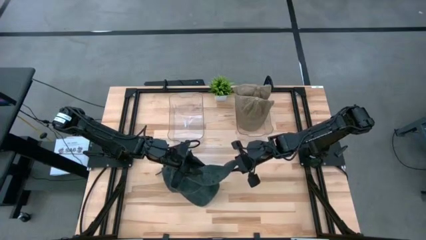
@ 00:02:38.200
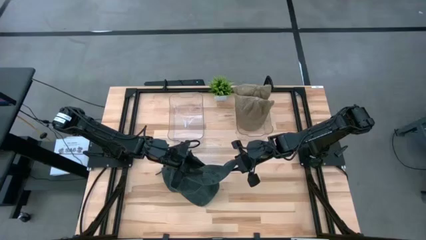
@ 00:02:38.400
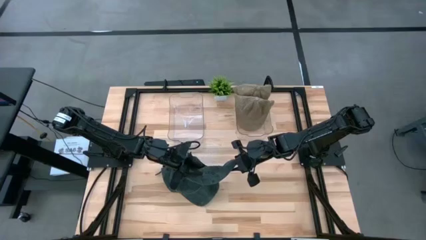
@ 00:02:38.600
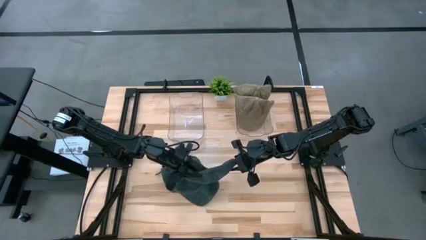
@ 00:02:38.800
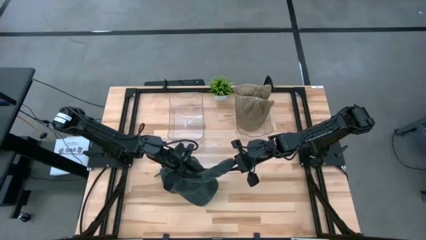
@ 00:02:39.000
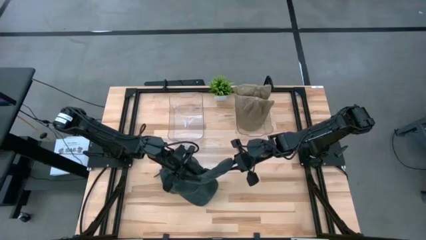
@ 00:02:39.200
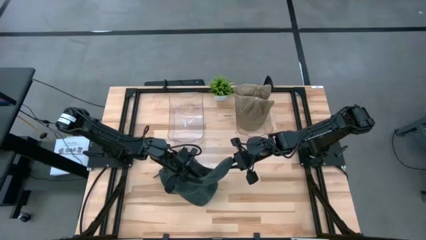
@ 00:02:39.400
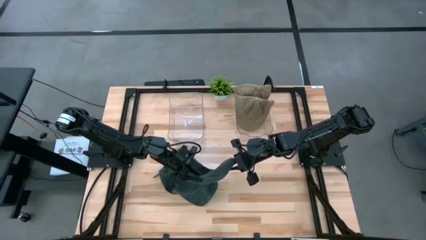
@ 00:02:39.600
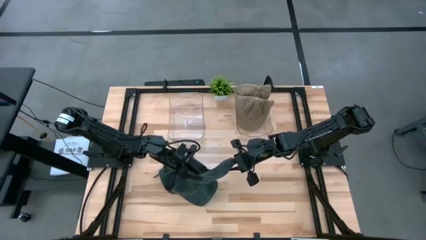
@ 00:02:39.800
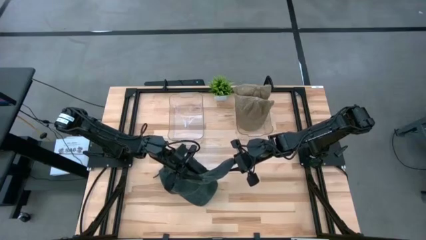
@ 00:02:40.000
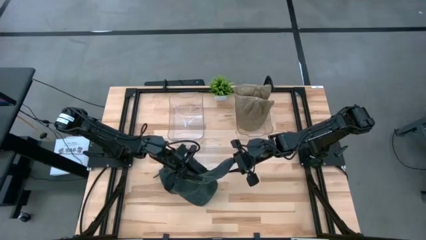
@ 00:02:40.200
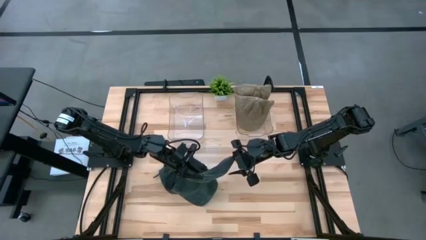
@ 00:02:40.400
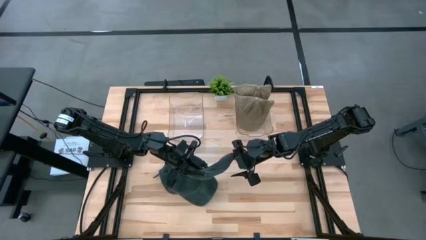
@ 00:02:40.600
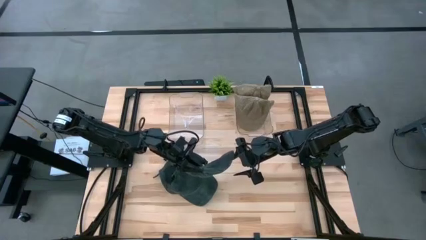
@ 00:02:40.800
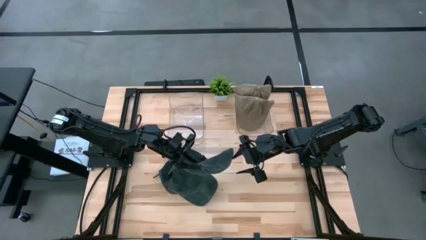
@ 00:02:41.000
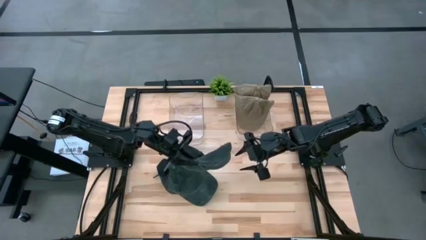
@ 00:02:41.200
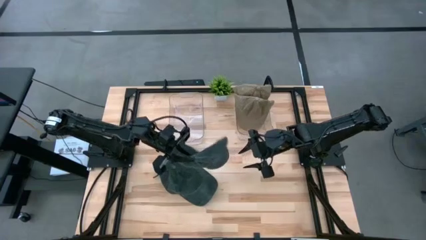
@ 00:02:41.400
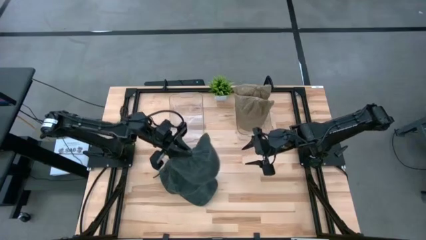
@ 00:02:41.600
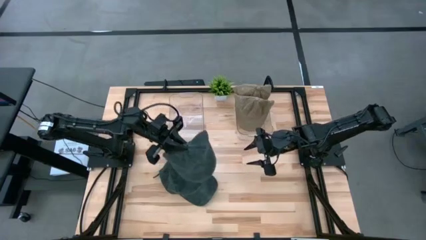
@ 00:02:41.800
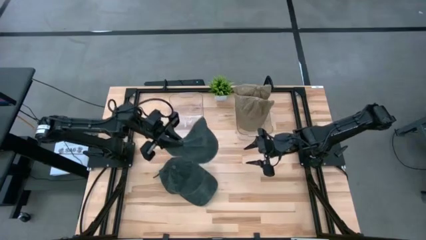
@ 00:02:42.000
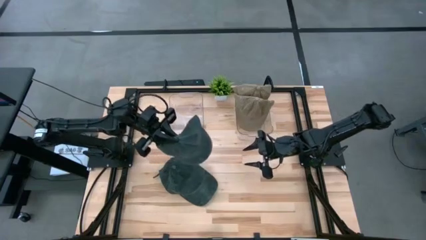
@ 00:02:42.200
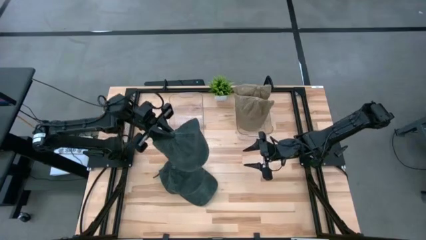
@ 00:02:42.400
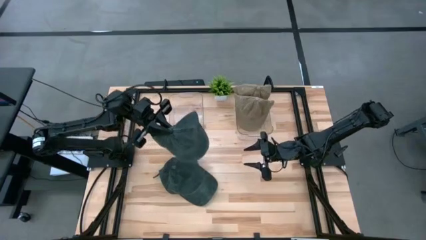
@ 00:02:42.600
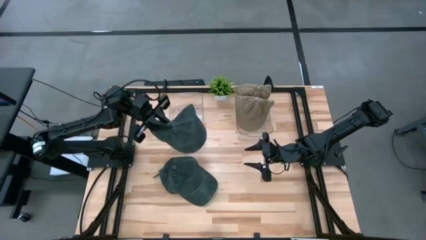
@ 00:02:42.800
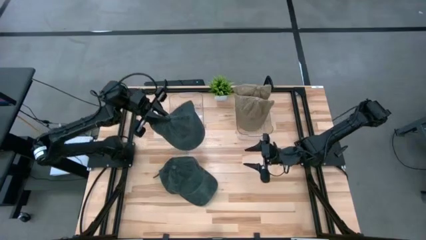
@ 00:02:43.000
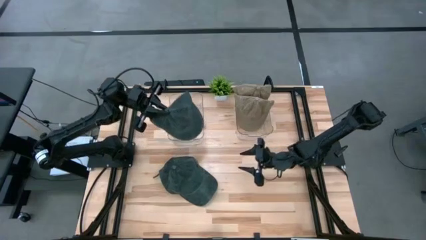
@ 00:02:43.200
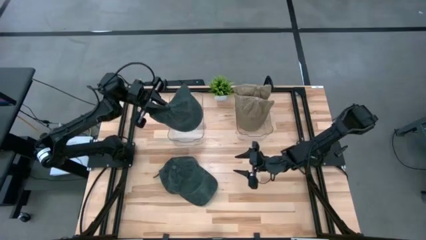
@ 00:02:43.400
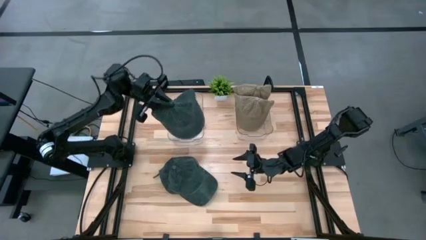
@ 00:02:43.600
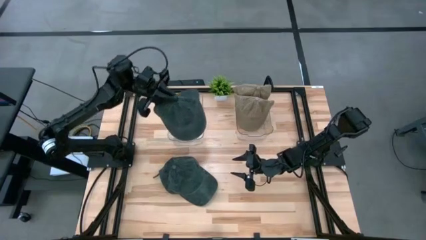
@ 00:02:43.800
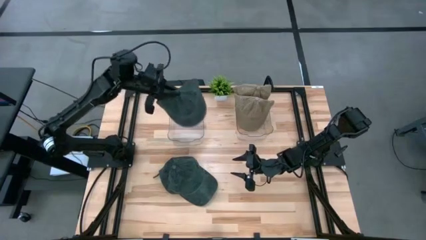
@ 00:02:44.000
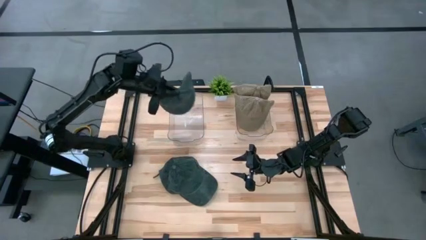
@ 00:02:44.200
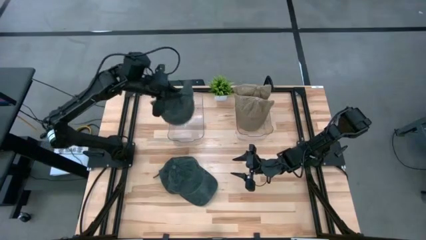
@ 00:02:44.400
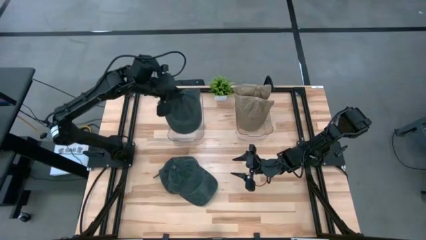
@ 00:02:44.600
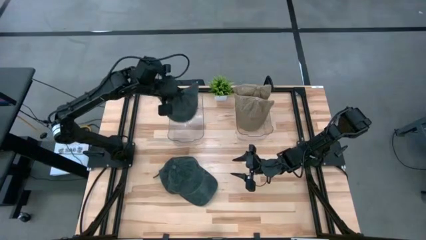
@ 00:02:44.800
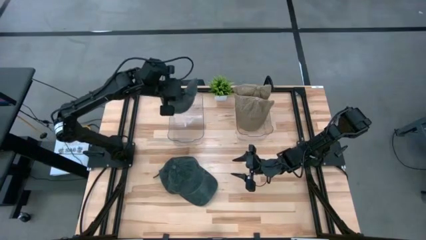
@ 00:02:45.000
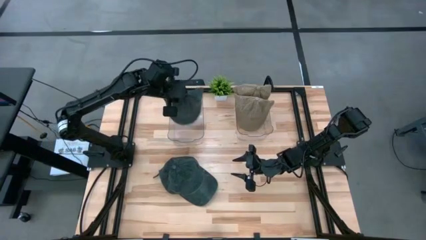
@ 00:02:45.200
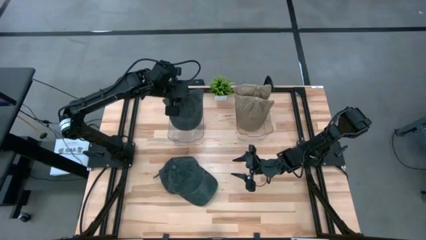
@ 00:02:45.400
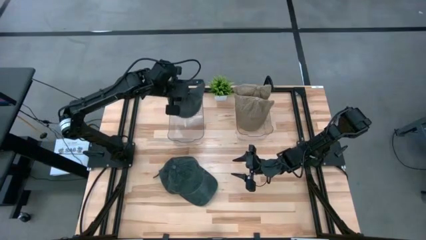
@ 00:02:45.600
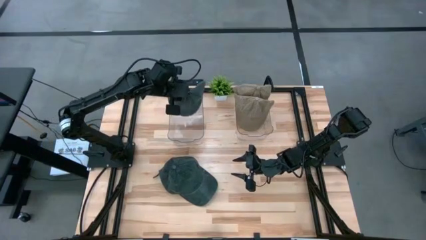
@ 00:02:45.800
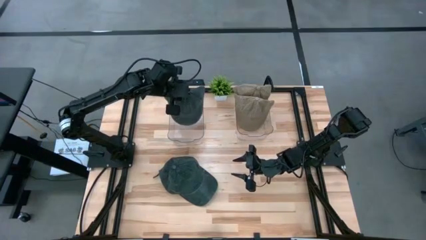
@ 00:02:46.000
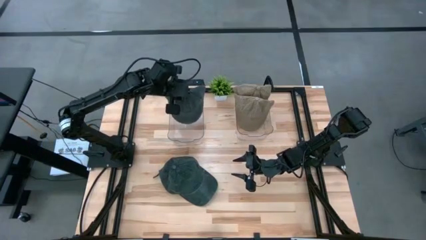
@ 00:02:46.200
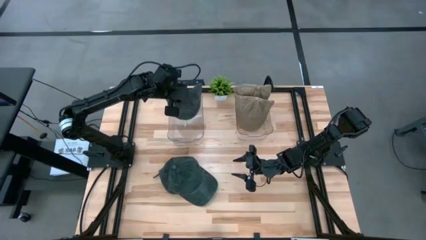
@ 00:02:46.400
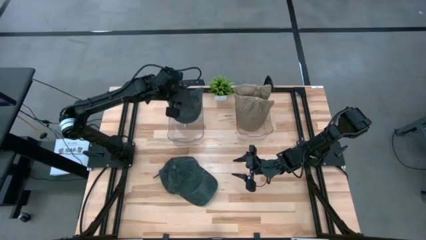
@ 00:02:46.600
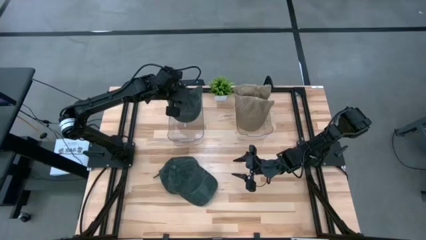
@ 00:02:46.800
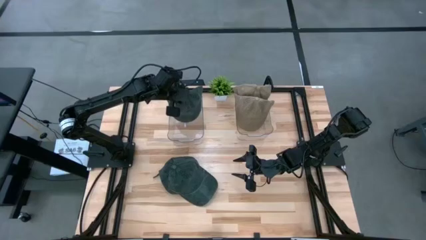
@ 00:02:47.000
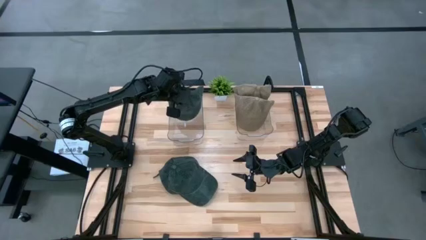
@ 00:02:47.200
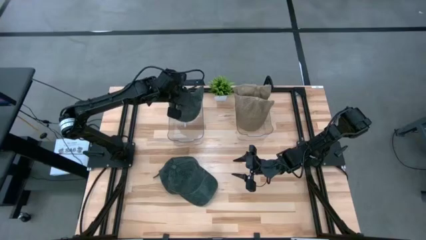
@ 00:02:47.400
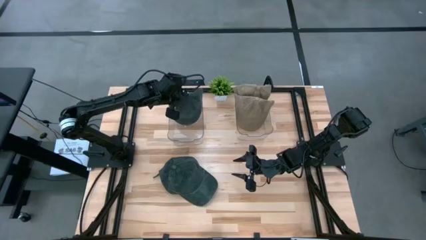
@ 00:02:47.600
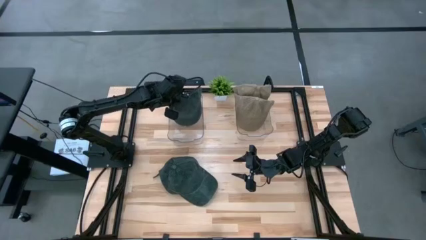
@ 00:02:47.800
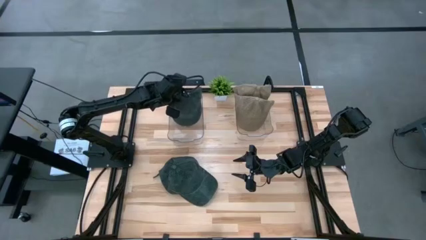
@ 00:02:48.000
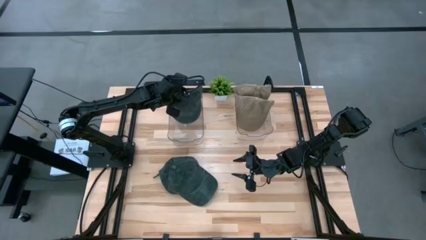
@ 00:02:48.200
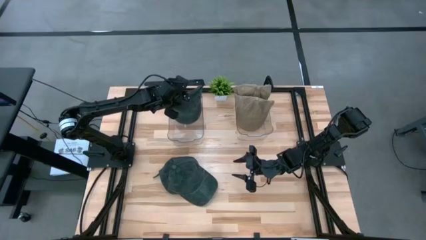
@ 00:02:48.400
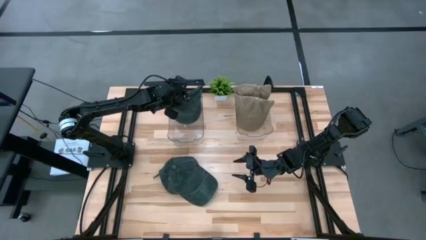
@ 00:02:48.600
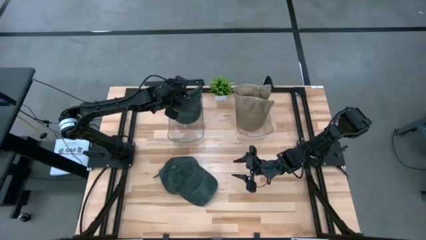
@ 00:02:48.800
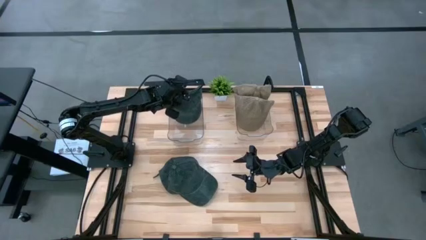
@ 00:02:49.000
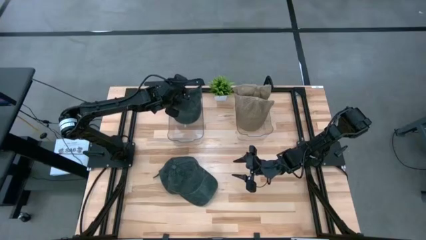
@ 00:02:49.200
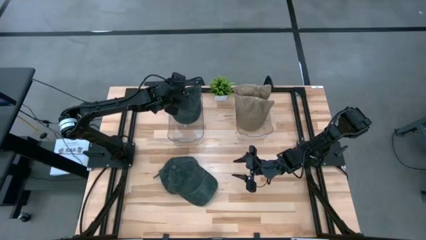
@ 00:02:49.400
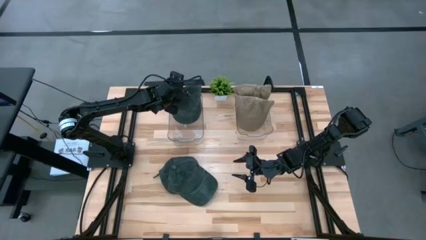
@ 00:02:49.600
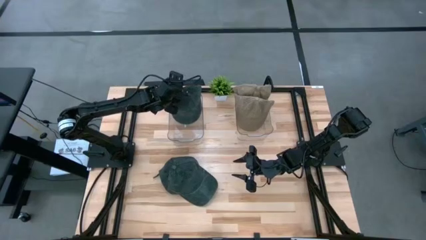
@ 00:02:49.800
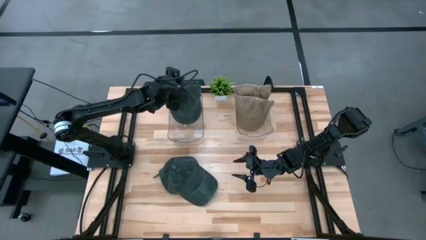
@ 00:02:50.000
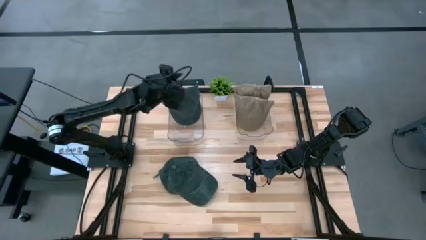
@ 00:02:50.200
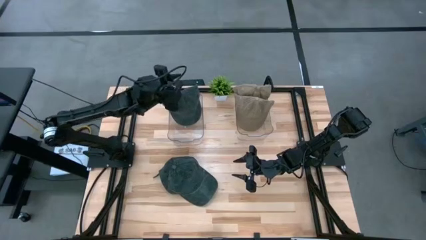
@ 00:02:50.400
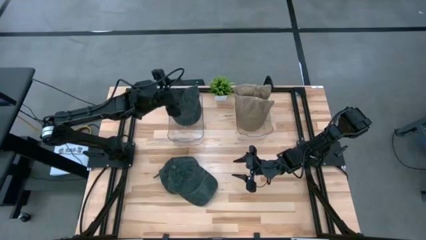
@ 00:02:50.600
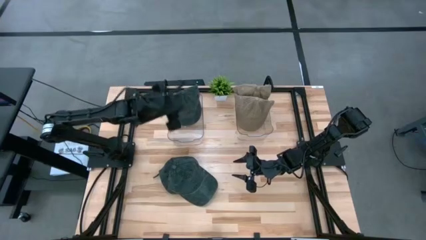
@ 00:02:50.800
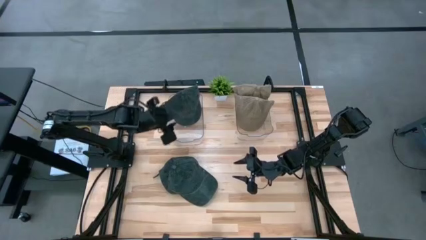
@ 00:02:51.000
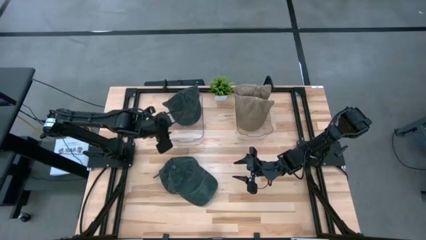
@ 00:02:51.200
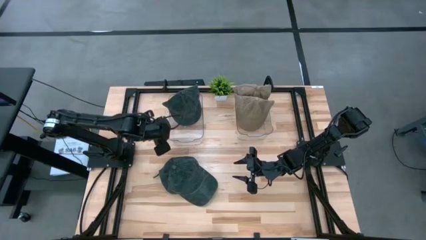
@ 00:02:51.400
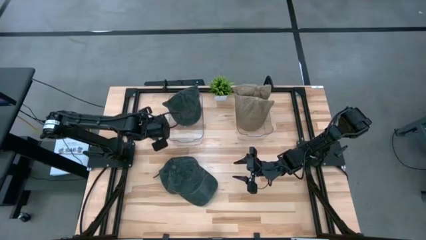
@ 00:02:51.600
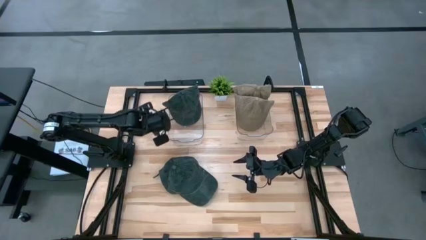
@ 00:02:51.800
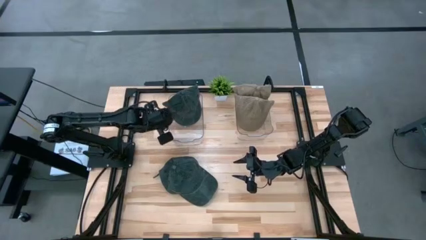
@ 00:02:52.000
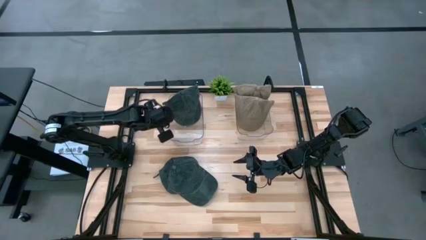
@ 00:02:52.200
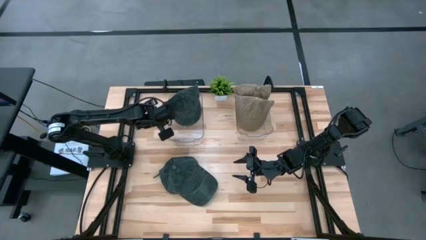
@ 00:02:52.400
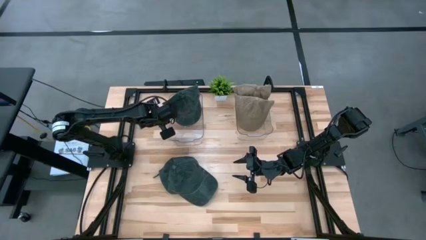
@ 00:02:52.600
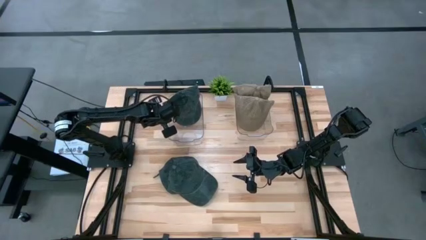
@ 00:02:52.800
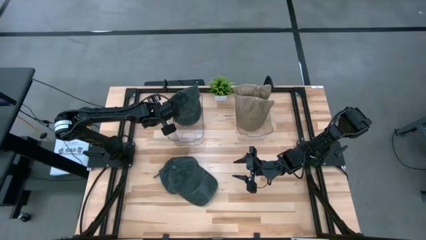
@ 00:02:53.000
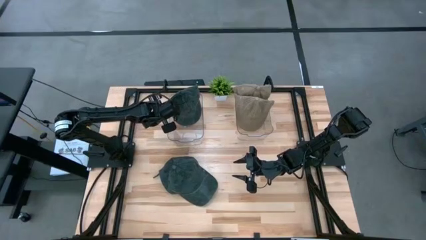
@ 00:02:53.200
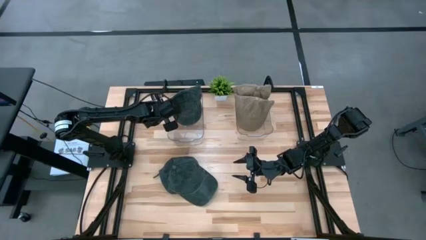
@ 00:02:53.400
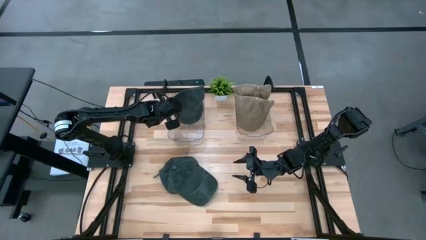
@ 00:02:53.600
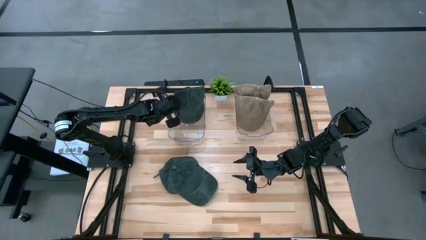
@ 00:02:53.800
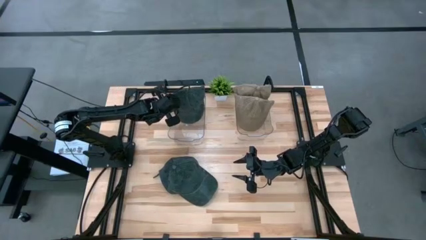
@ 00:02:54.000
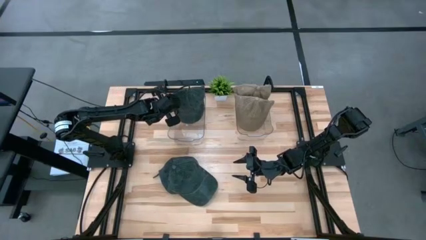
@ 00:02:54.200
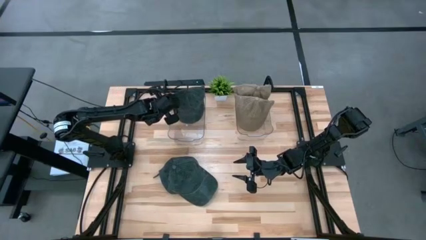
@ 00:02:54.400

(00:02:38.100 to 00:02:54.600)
Task: Pick & Place hat
Put the right black cap into the left transparent container
